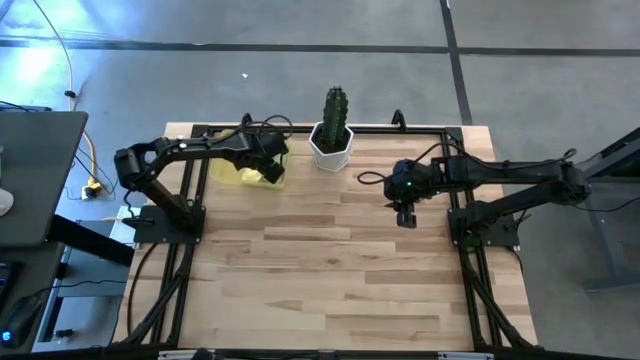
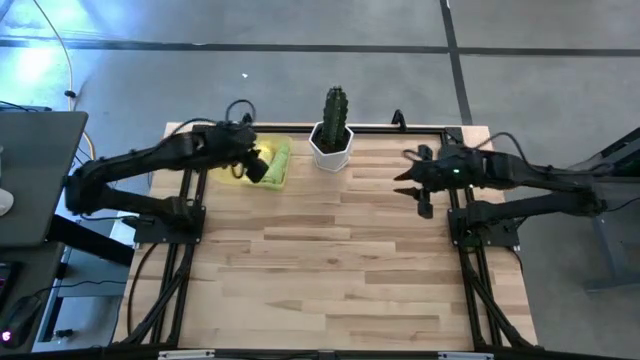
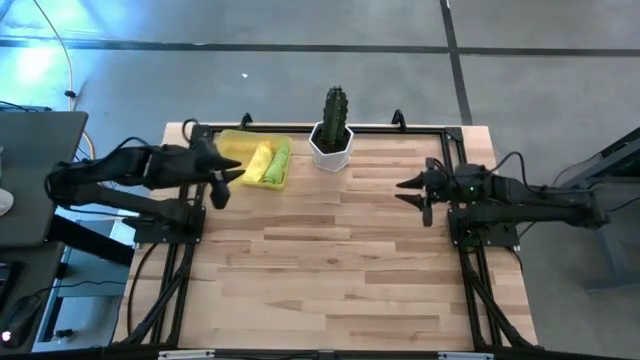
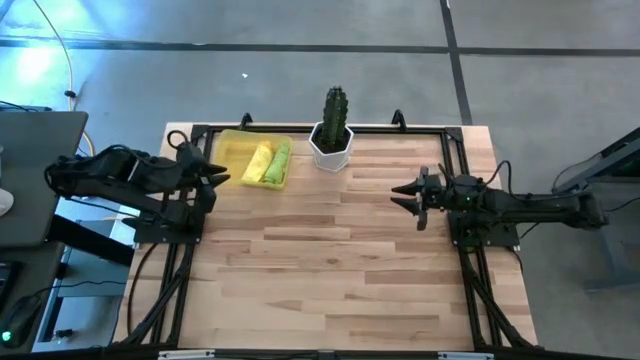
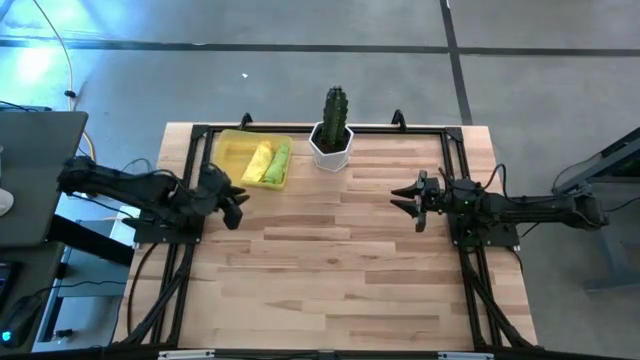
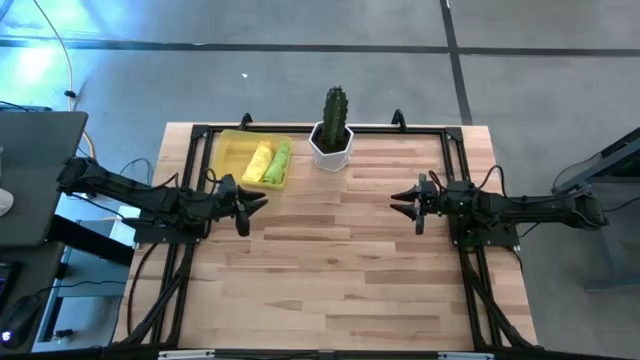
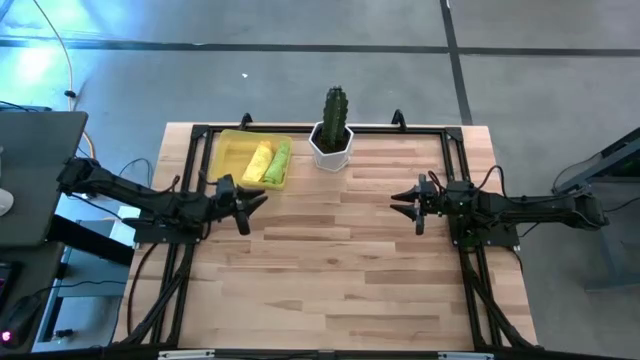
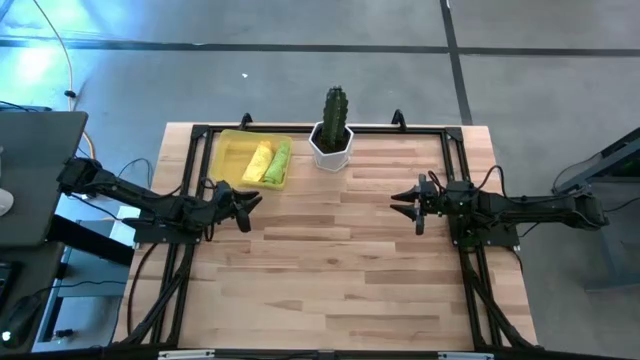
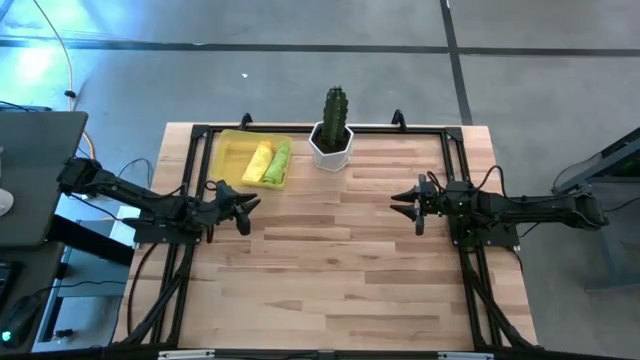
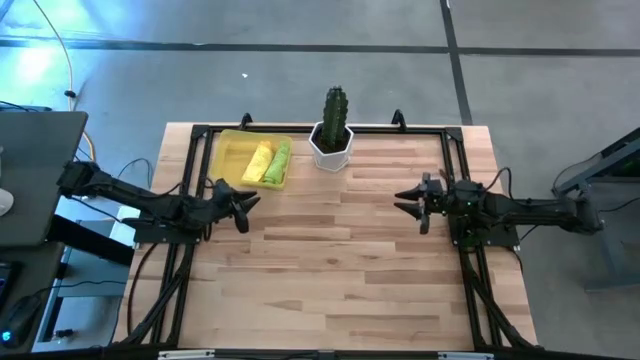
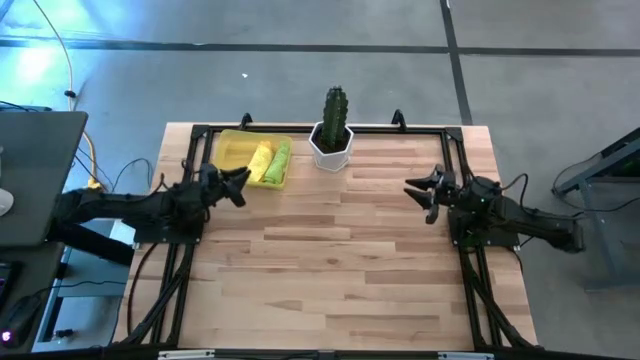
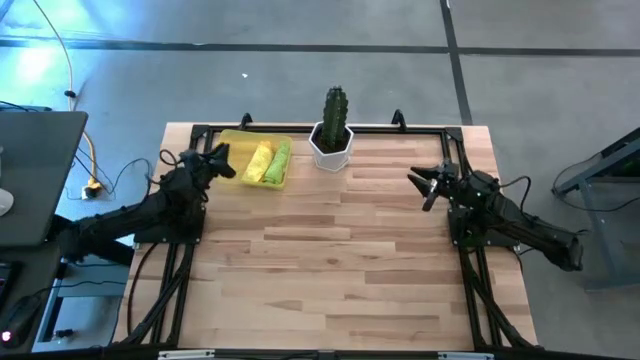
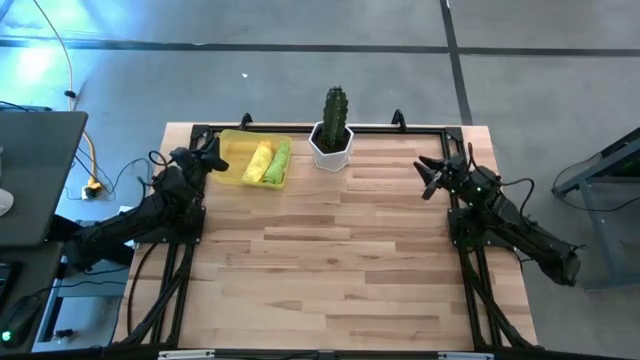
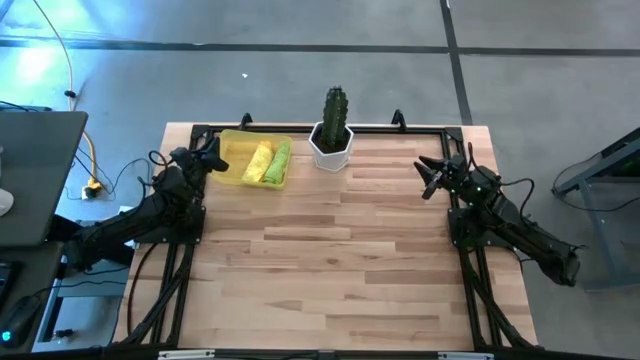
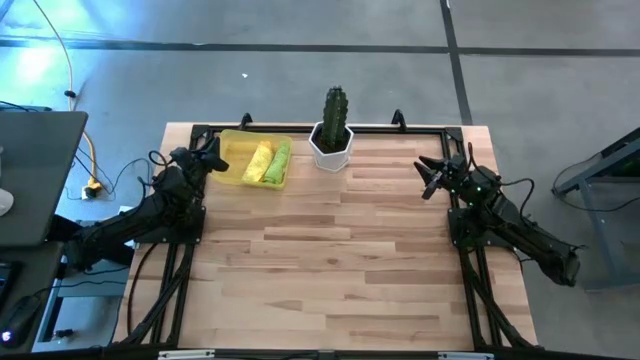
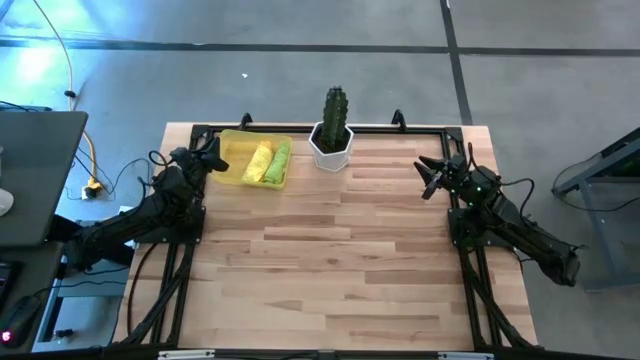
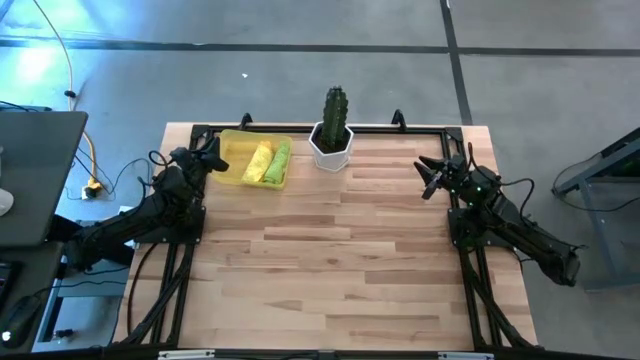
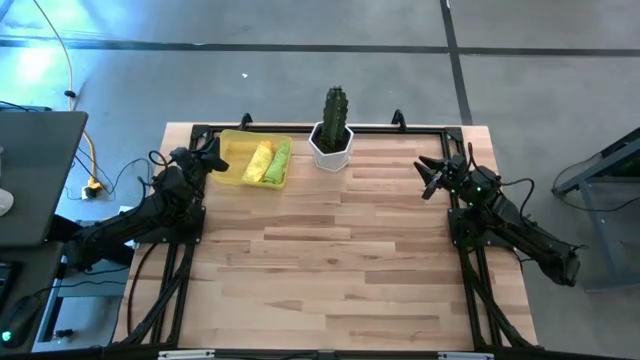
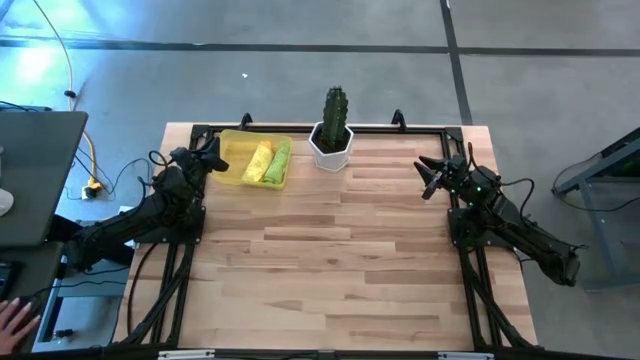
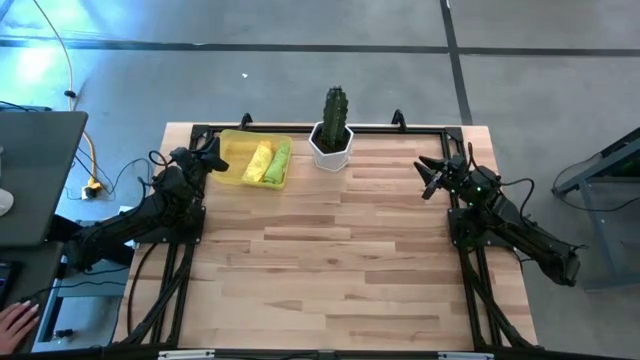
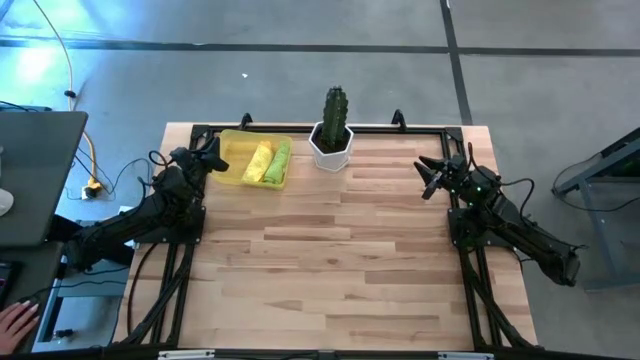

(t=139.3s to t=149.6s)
Task: Roll microfiber towels into tight, uniform cylinder then place into a basket
Return to Home Position

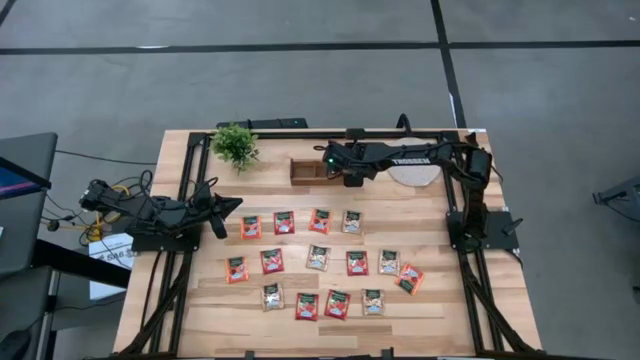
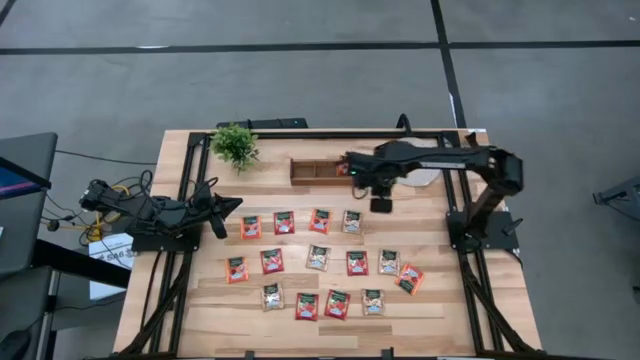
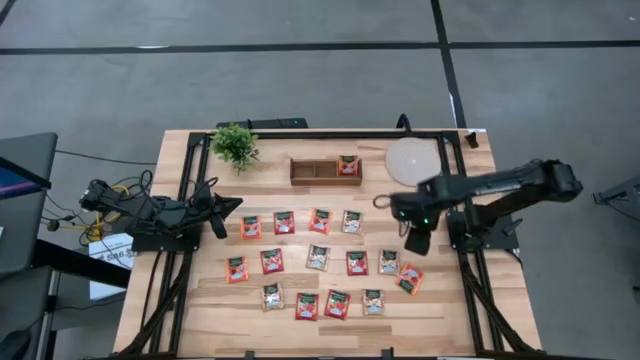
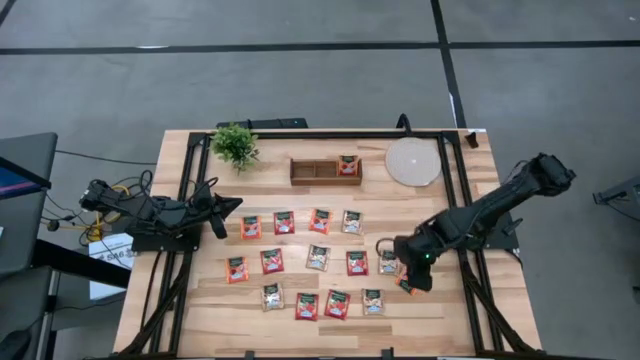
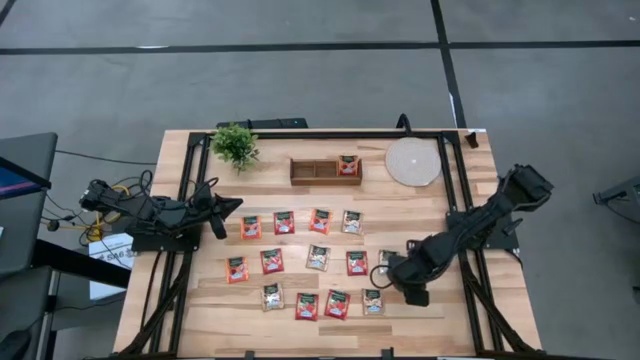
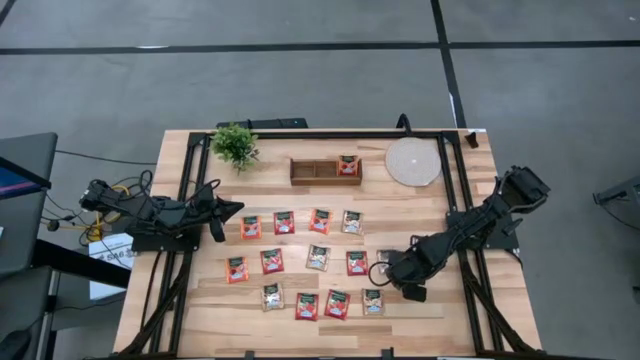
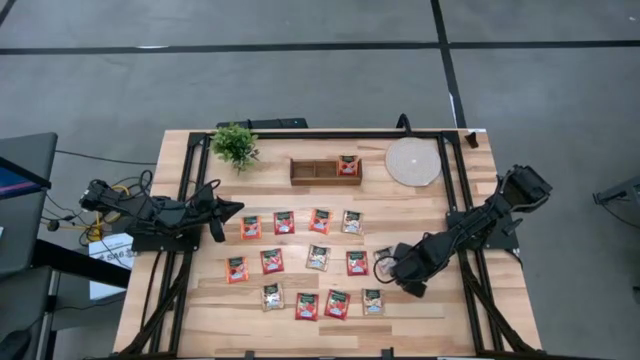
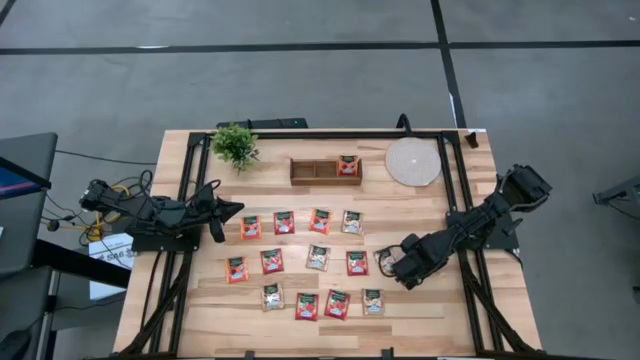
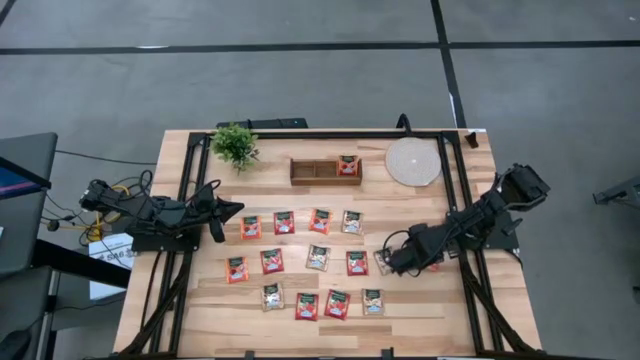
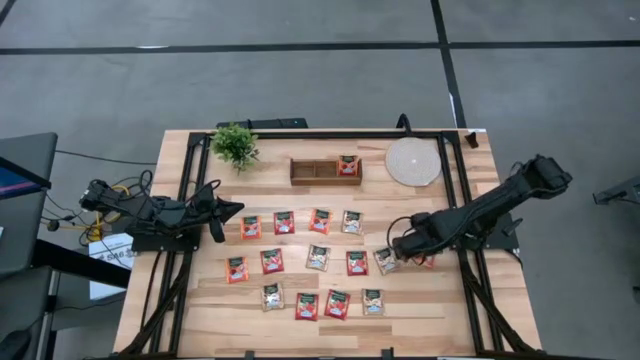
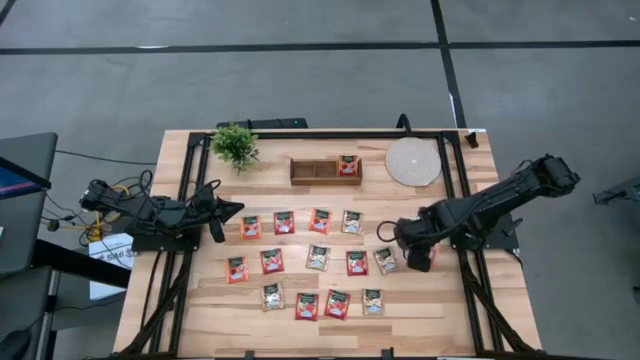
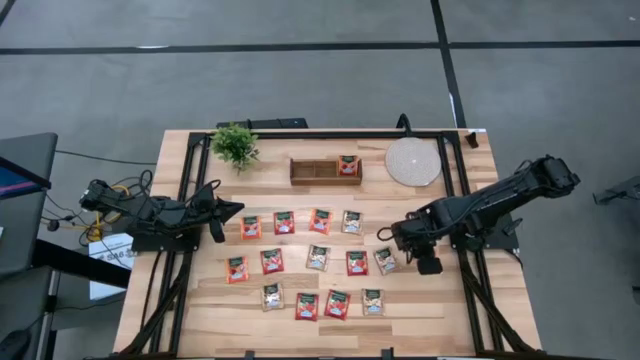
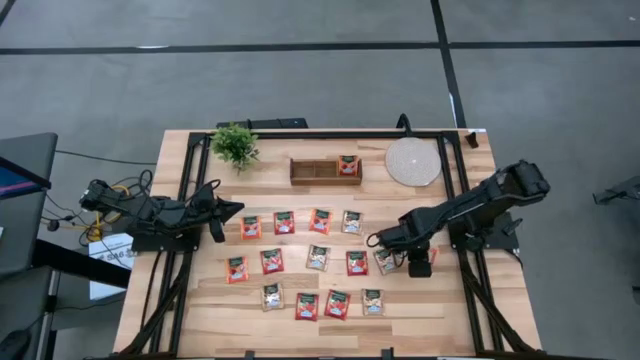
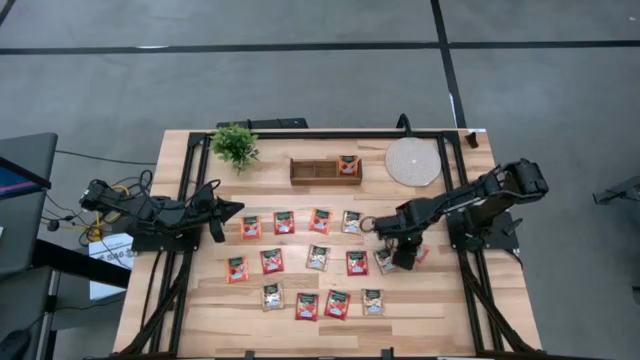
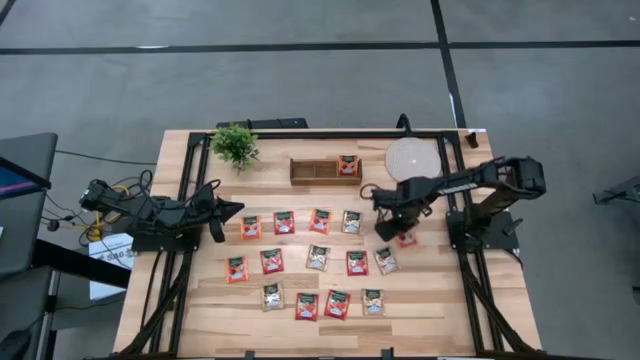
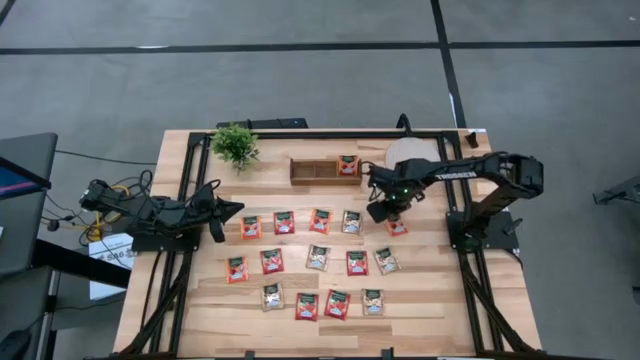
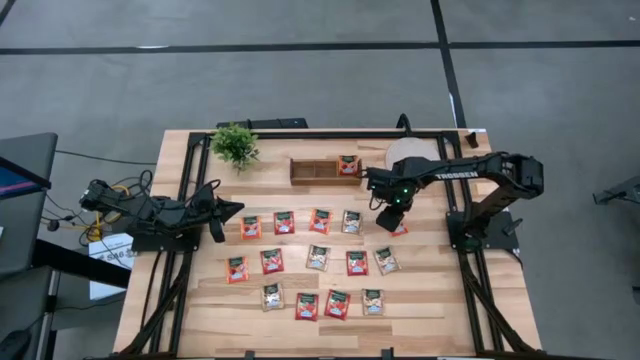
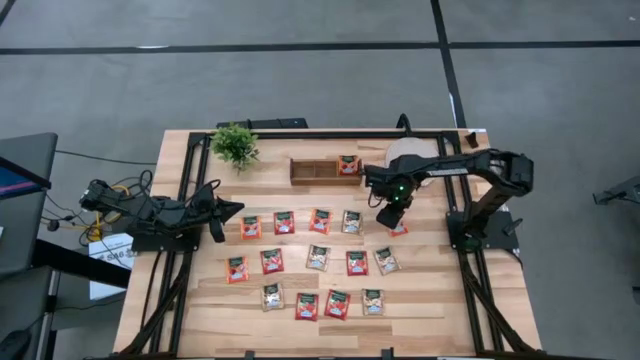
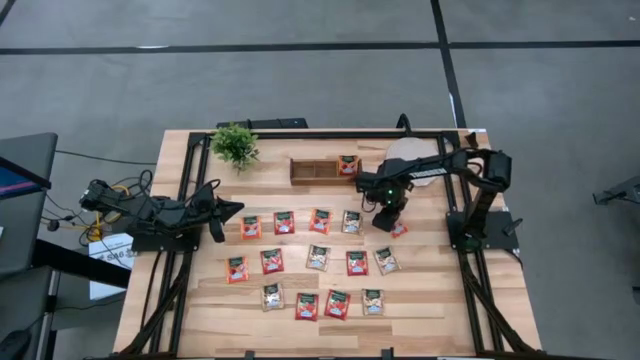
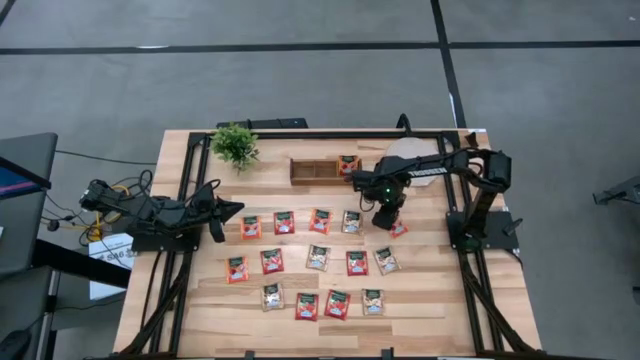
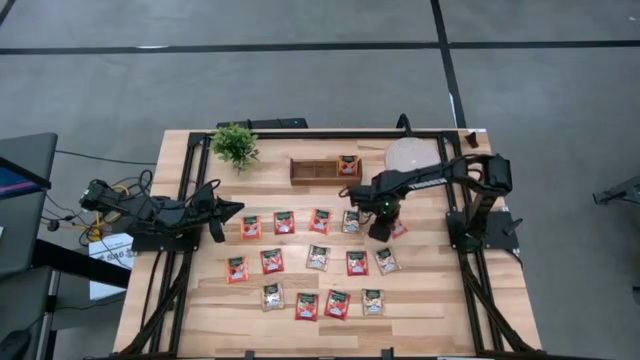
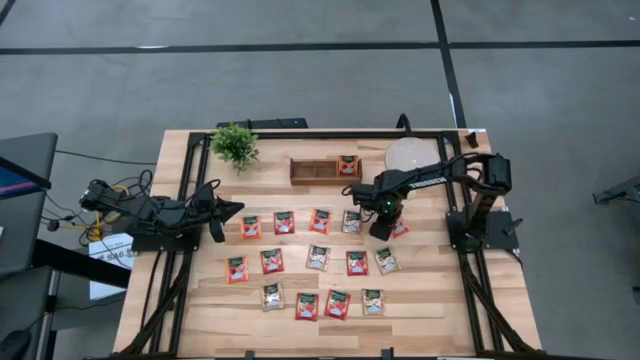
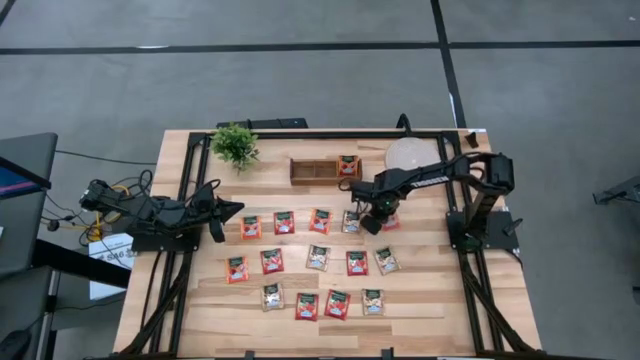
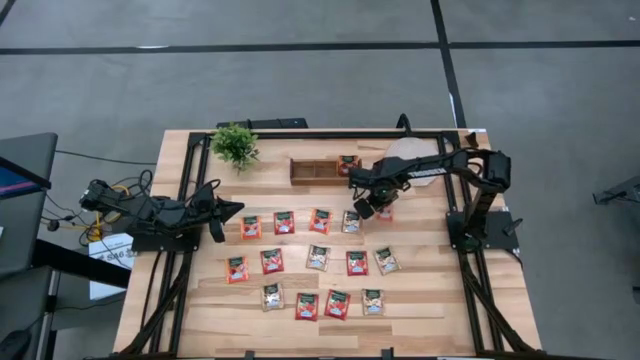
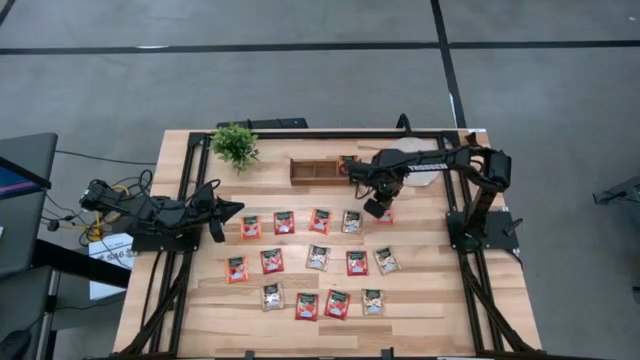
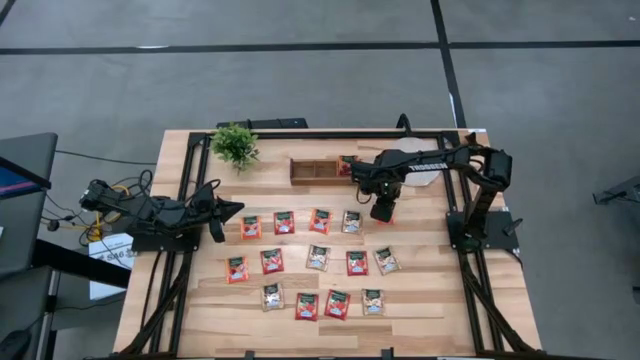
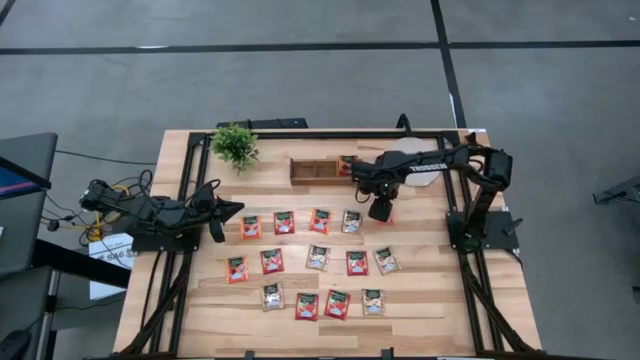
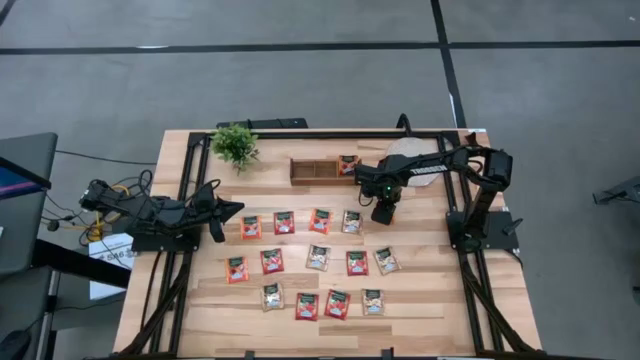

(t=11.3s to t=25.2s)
Task: Pick & Place Tea
Put the orange tea bag into the right section of the wooden organizer
